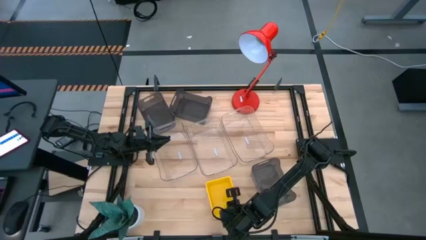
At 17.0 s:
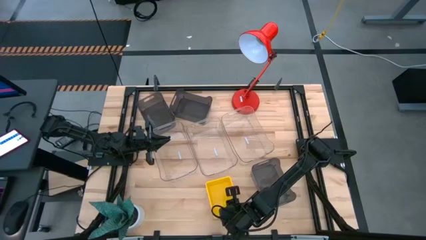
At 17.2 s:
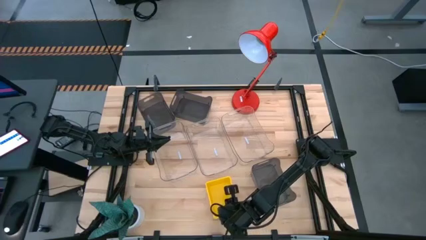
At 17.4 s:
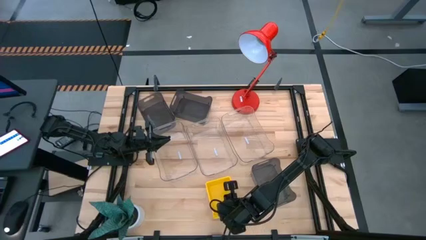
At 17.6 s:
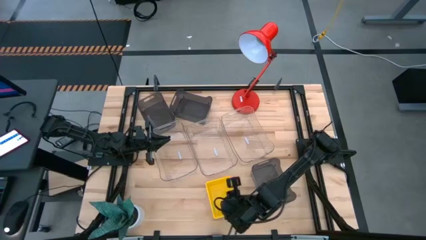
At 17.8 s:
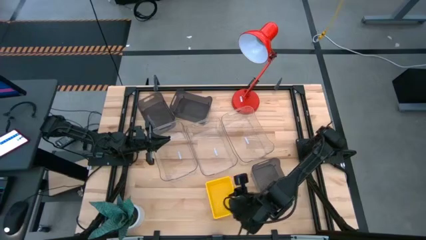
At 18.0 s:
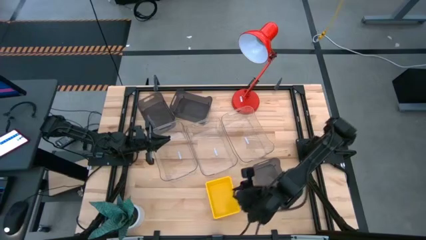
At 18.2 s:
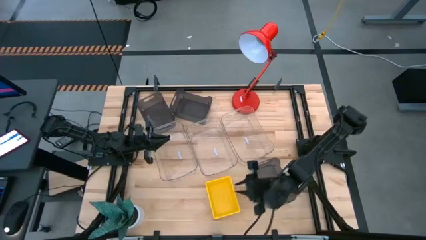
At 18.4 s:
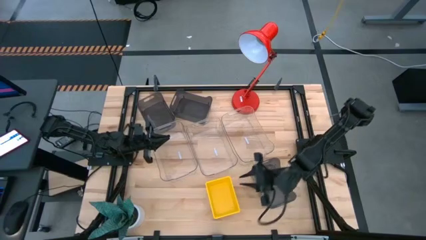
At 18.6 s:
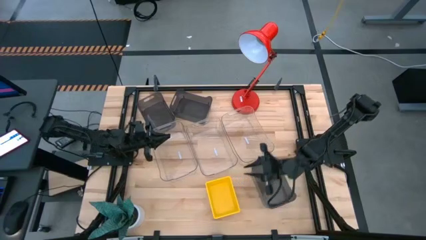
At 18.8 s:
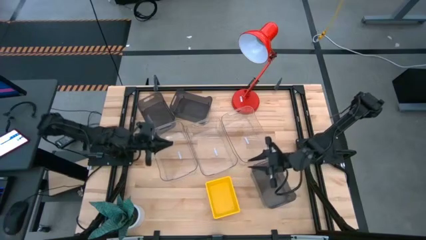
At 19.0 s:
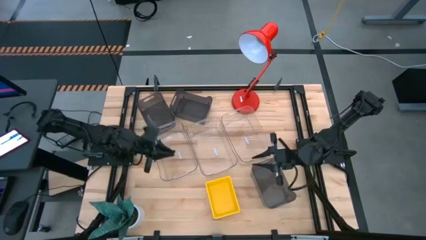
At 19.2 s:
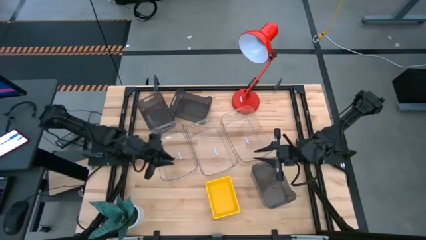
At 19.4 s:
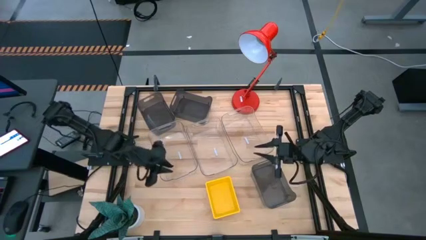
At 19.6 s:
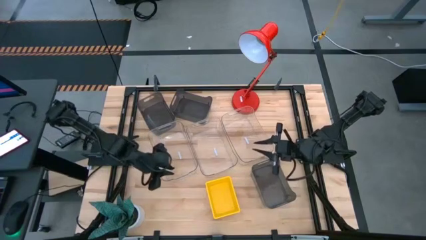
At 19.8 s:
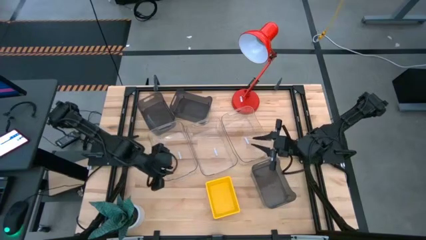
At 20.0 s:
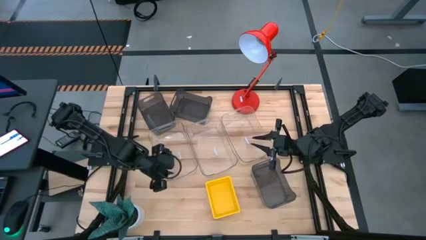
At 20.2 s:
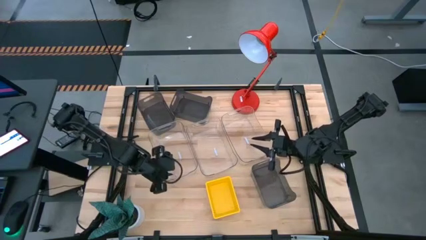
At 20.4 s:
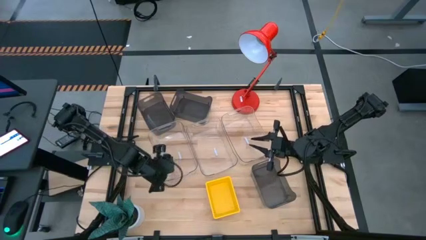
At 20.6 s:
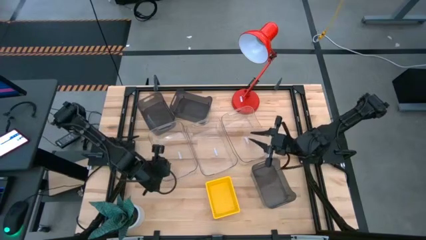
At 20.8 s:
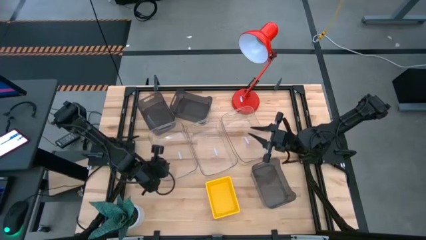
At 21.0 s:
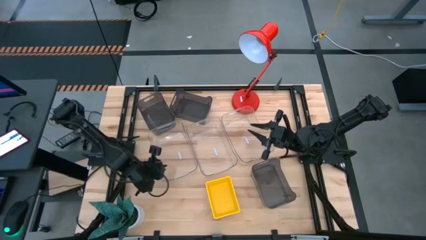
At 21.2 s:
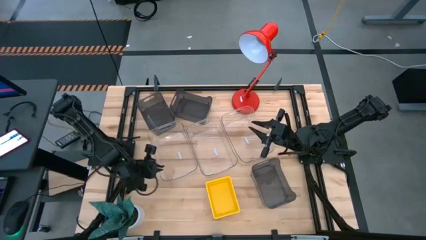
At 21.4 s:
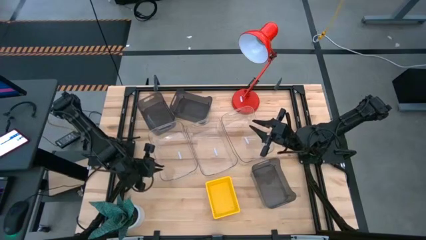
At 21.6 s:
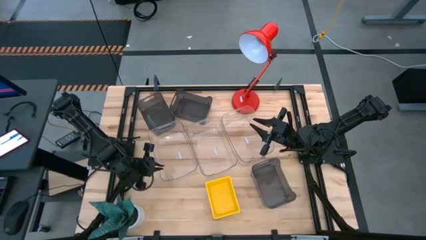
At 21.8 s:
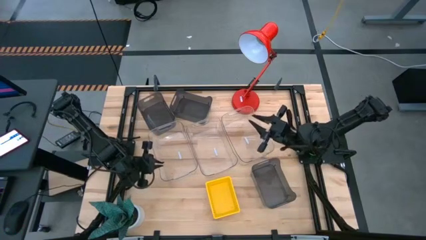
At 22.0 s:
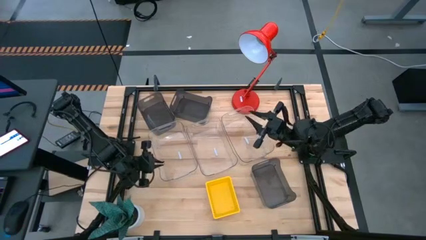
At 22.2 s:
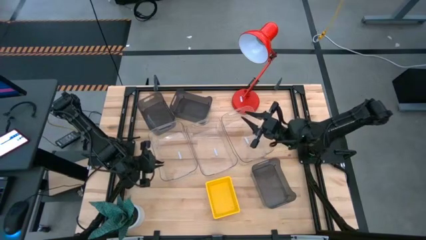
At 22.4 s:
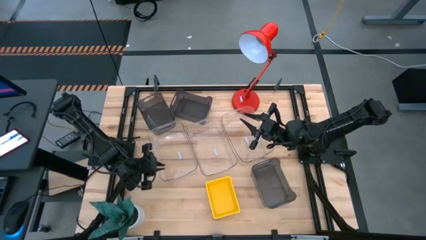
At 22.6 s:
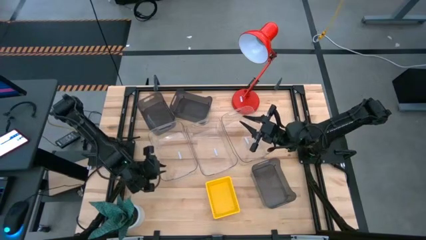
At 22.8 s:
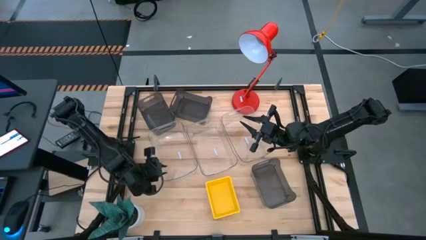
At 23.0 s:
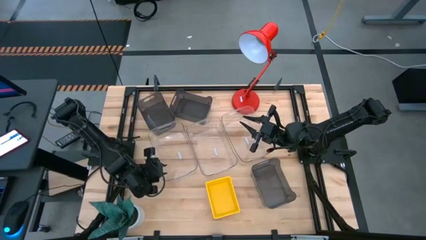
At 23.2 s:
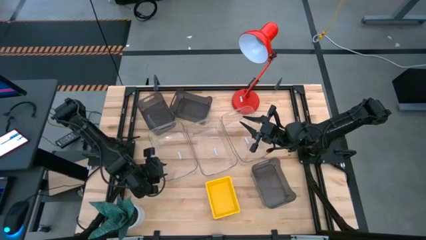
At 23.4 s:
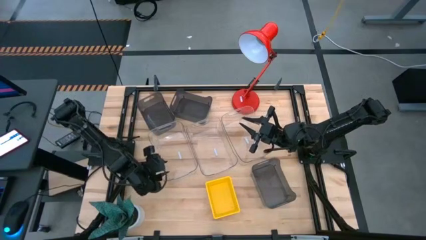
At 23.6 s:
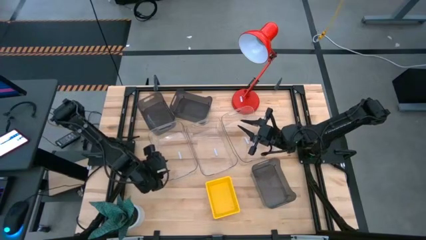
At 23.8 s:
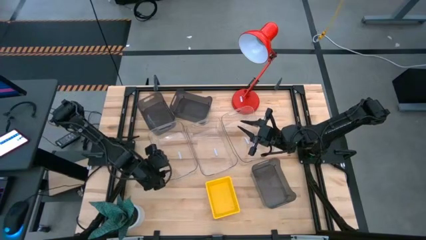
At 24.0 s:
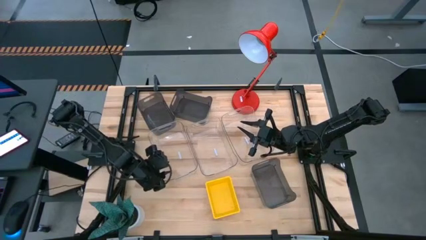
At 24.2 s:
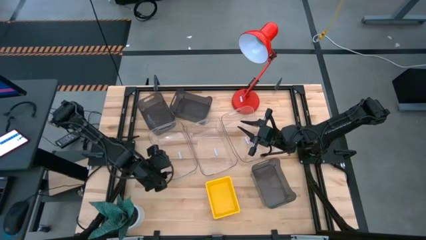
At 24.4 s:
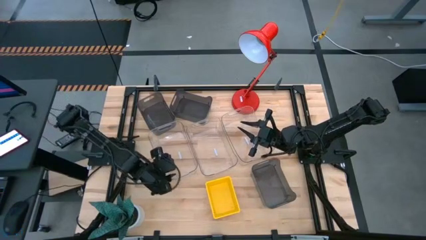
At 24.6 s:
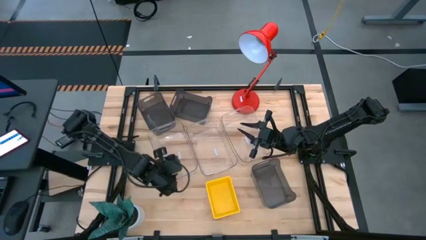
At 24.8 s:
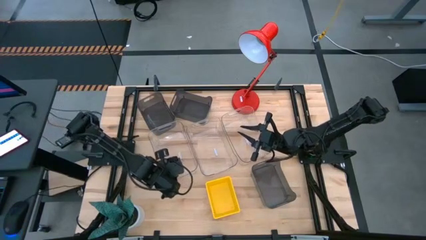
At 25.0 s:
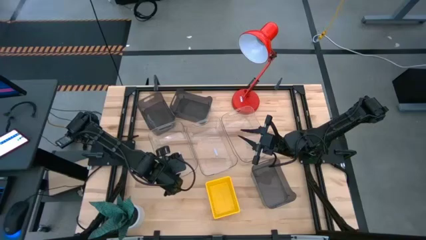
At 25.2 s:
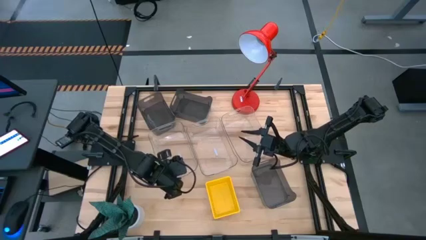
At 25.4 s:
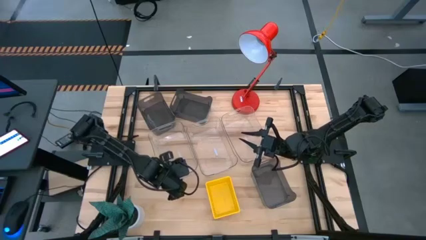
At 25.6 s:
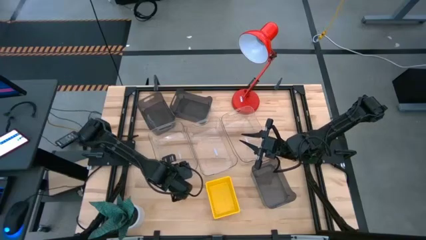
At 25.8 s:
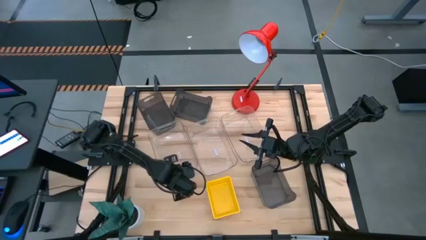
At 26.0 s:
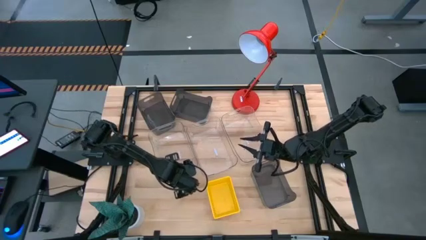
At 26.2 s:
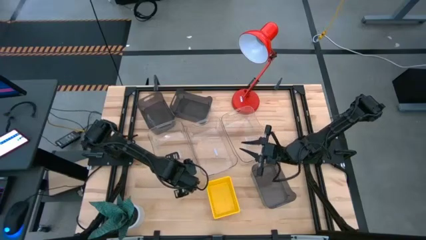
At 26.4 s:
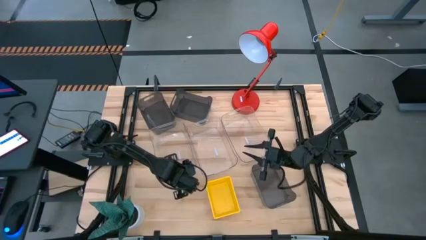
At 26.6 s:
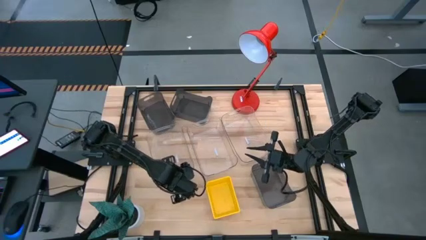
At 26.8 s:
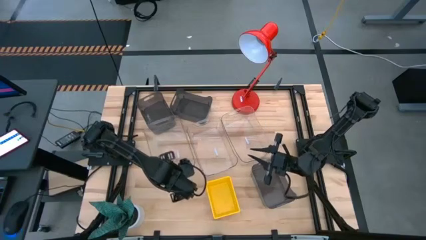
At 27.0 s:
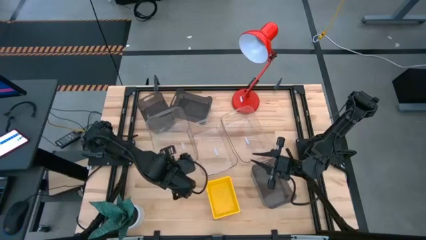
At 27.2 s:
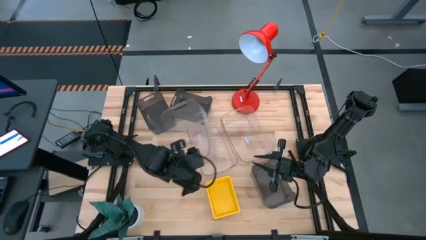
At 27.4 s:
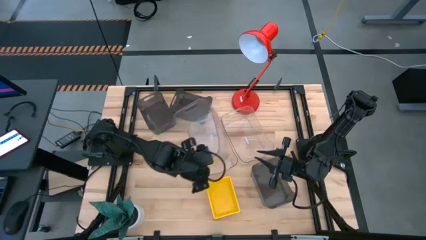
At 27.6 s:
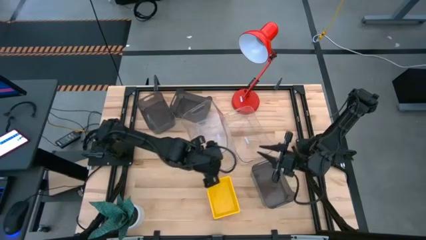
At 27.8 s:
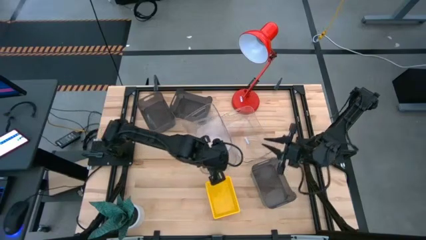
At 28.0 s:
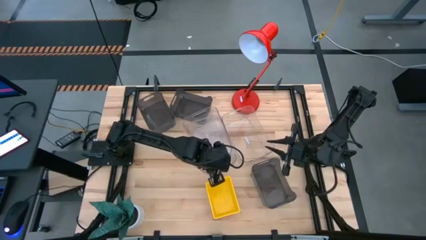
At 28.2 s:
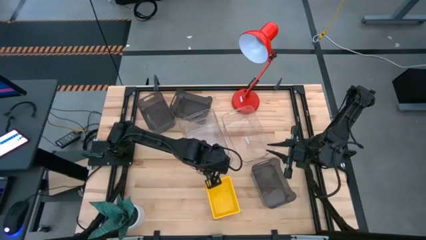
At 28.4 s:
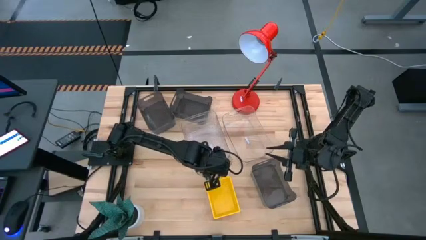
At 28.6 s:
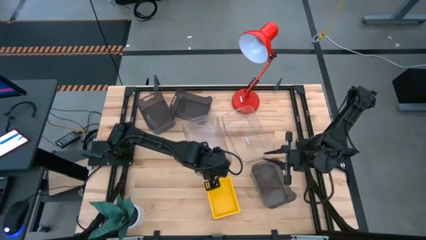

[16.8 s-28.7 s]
Stack the left transparent bin on the middle transparent bin

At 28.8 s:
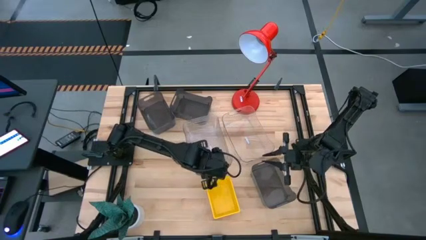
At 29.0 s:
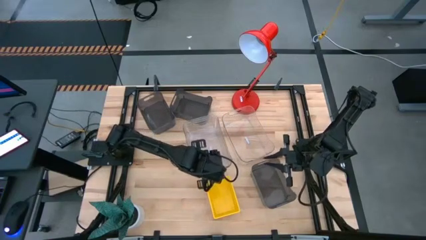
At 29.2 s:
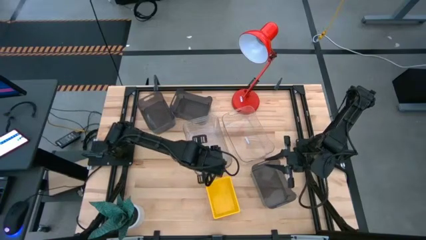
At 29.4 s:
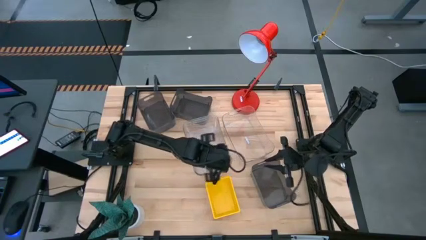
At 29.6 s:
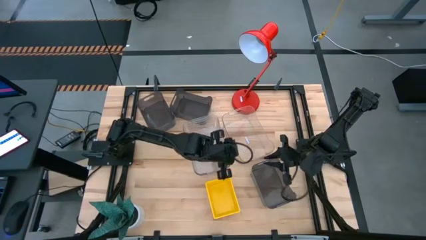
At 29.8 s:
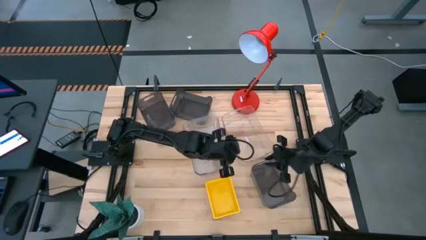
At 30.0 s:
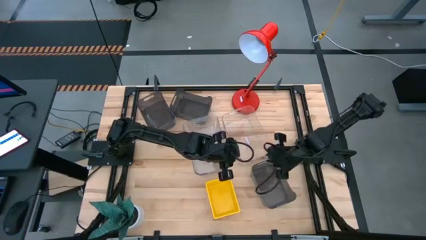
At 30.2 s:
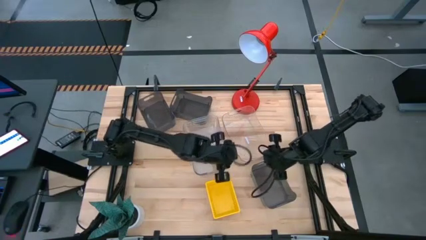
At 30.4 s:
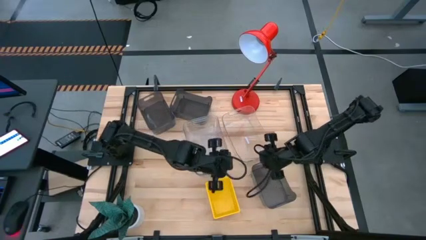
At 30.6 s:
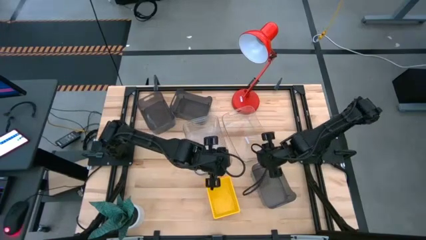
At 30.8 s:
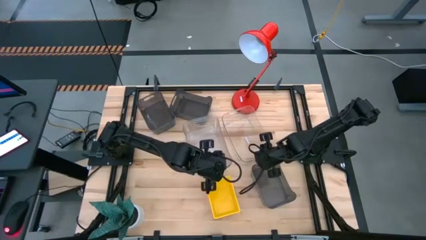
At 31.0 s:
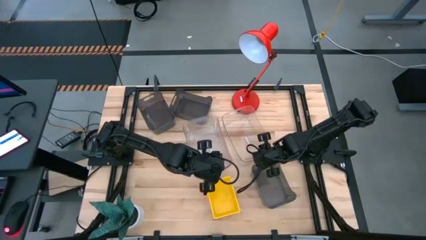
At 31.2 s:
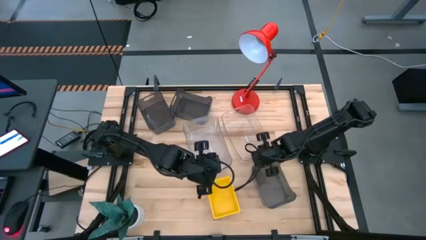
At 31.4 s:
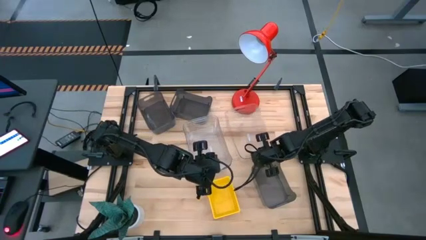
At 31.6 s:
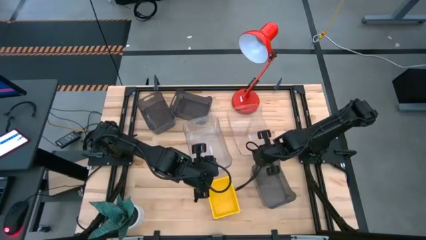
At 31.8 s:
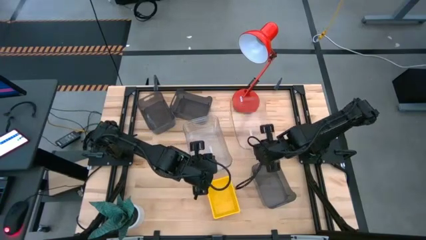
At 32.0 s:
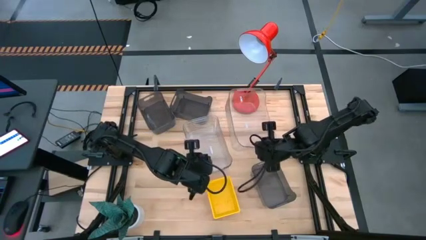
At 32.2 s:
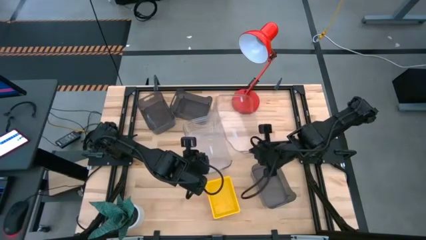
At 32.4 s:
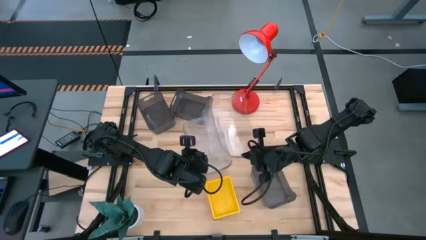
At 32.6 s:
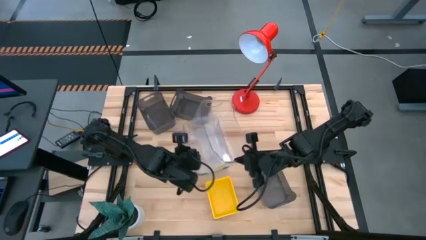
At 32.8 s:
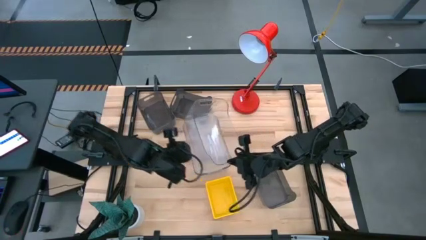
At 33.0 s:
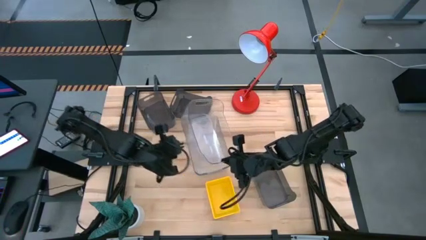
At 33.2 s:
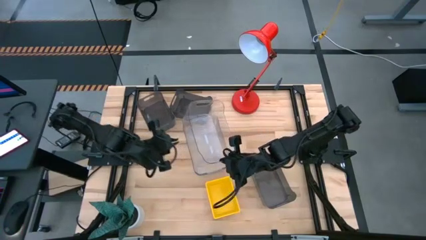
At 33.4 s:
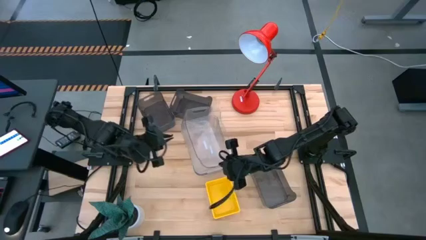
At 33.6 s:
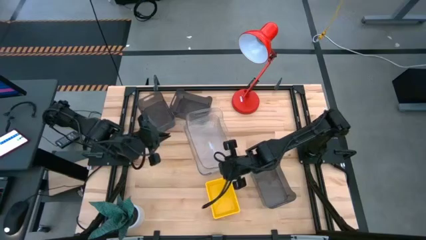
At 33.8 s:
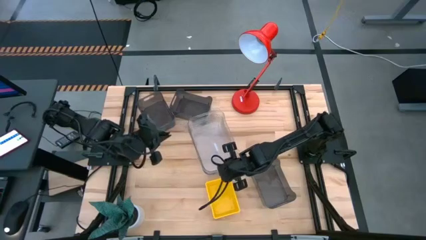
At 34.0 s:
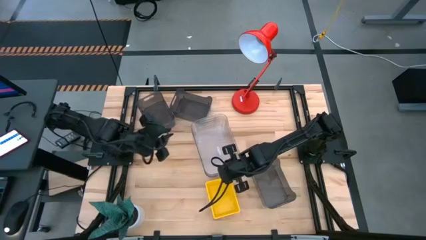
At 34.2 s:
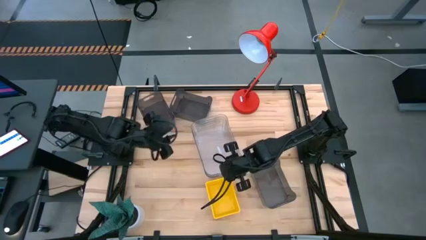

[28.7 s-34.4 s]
Stack the right transparent bin on the left transparent bin
